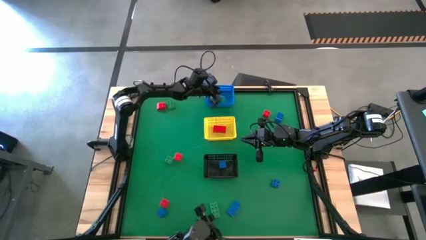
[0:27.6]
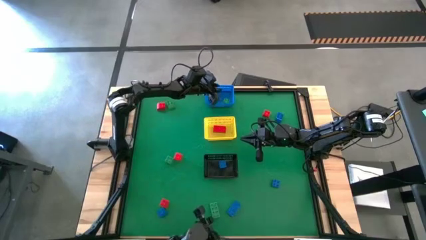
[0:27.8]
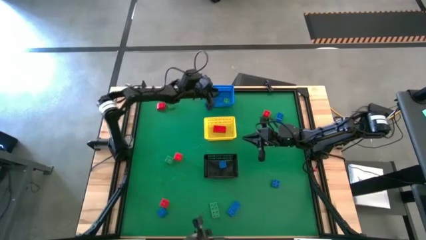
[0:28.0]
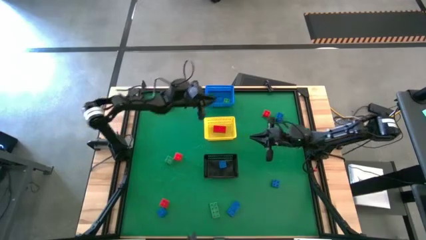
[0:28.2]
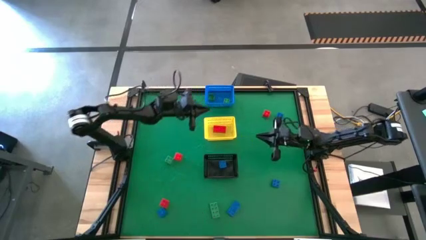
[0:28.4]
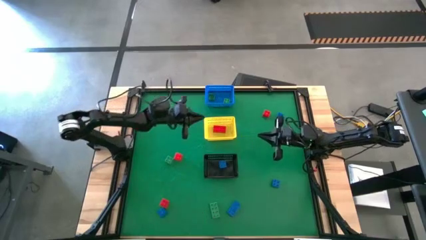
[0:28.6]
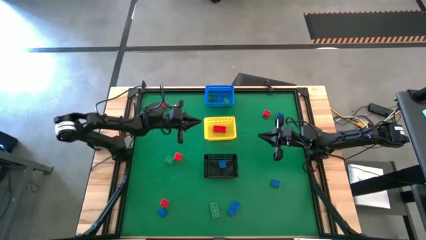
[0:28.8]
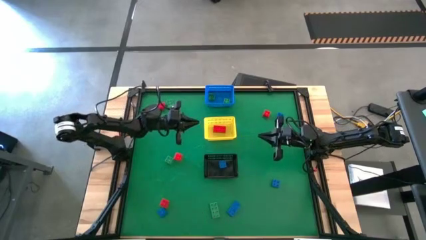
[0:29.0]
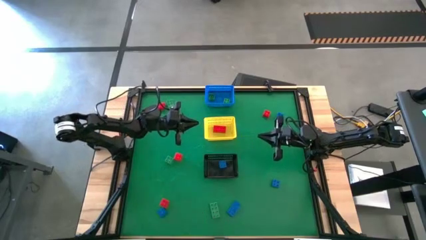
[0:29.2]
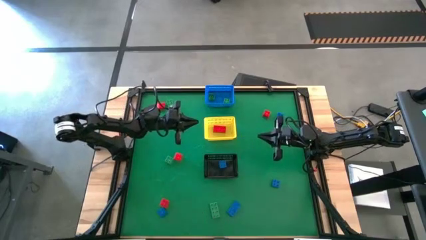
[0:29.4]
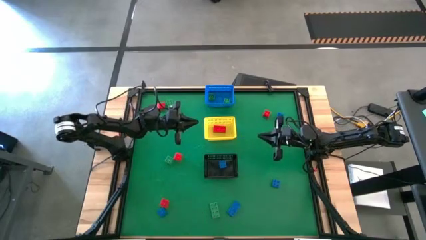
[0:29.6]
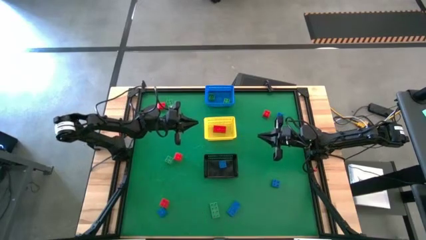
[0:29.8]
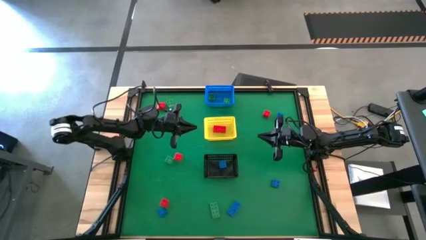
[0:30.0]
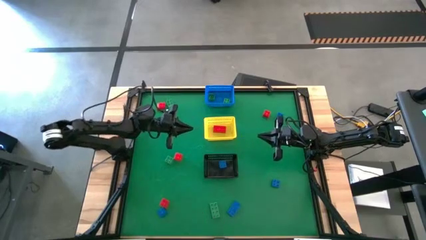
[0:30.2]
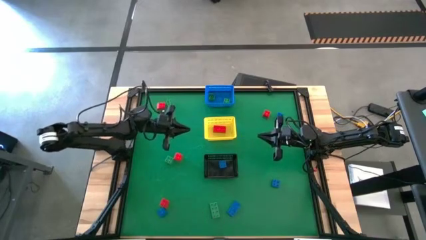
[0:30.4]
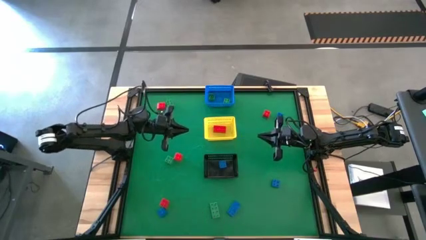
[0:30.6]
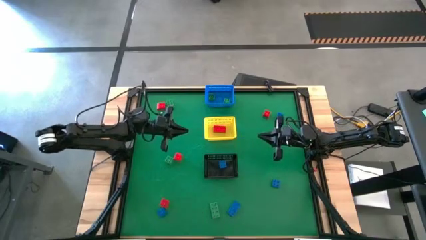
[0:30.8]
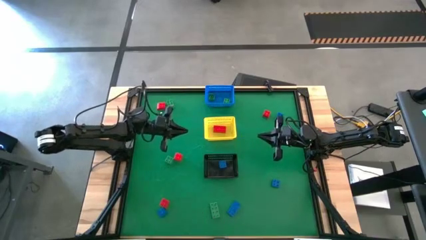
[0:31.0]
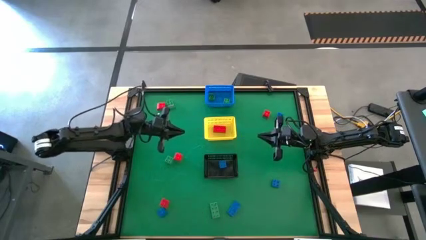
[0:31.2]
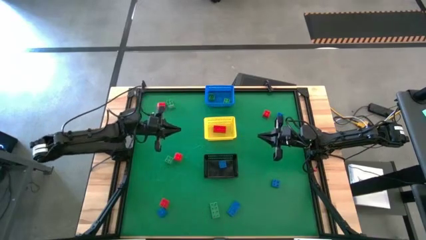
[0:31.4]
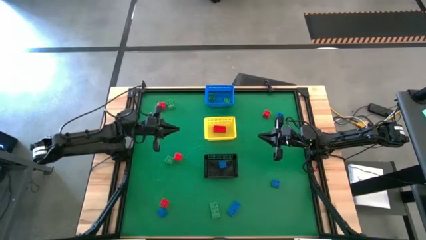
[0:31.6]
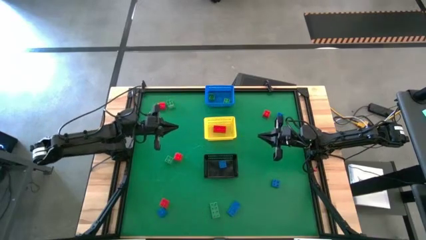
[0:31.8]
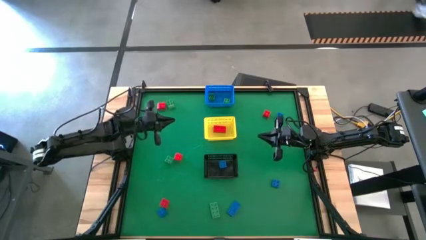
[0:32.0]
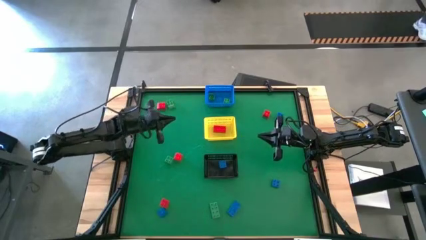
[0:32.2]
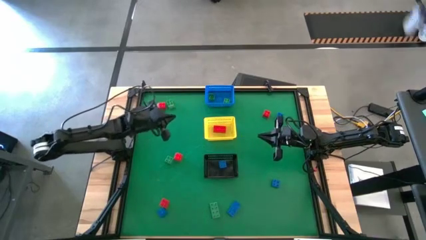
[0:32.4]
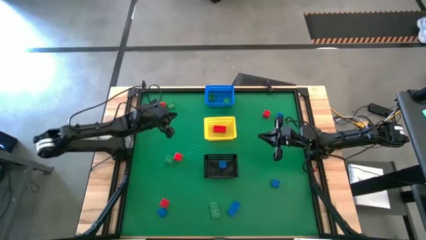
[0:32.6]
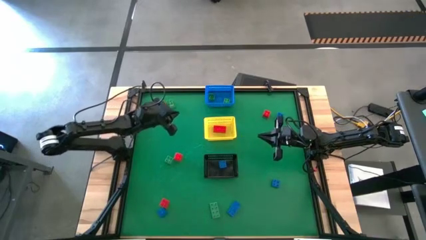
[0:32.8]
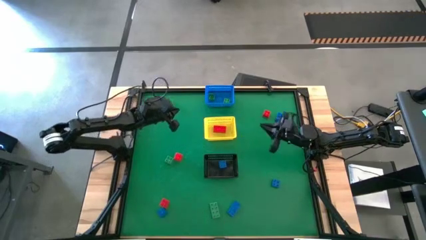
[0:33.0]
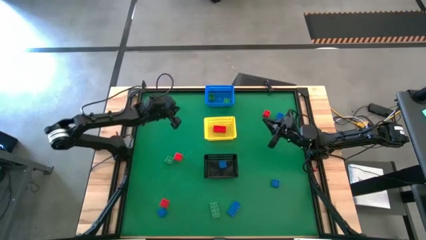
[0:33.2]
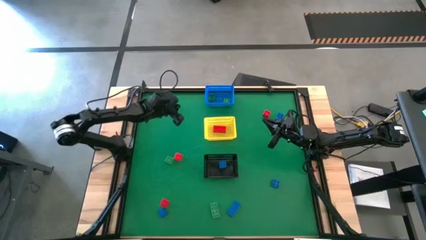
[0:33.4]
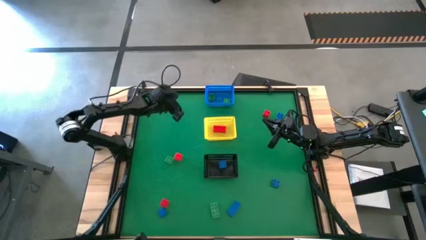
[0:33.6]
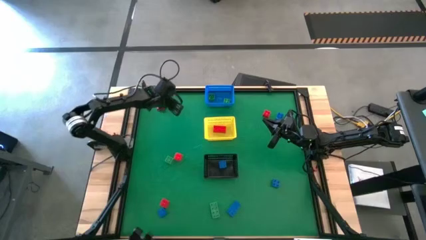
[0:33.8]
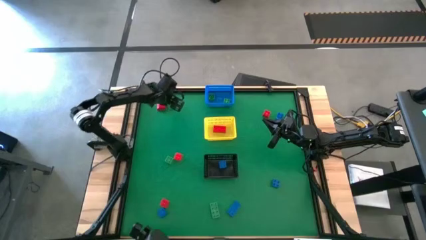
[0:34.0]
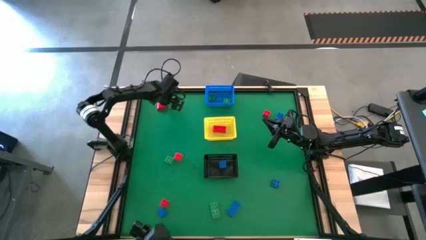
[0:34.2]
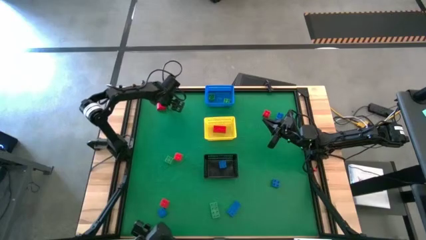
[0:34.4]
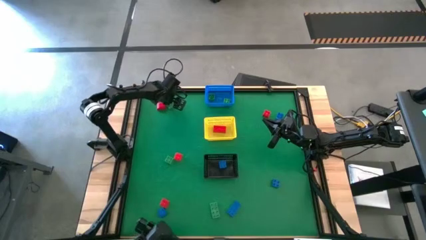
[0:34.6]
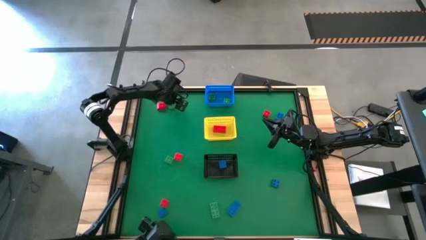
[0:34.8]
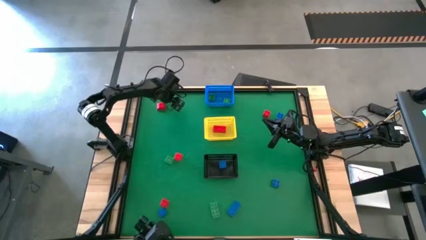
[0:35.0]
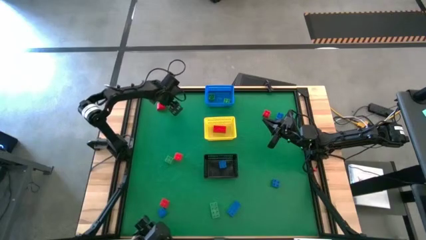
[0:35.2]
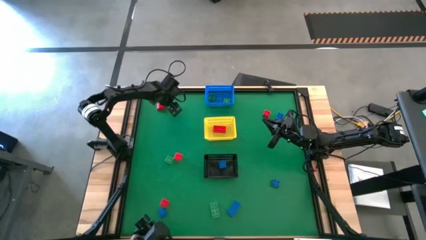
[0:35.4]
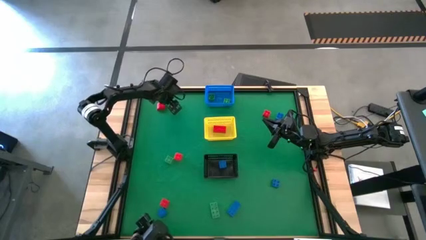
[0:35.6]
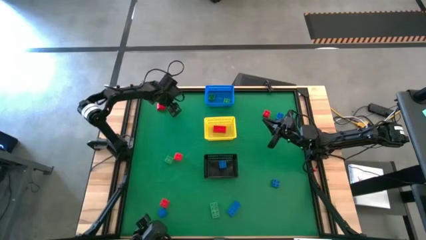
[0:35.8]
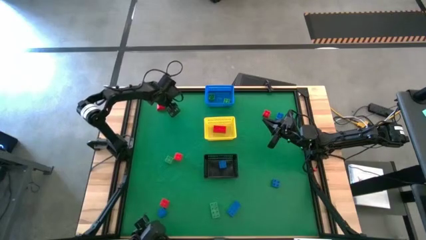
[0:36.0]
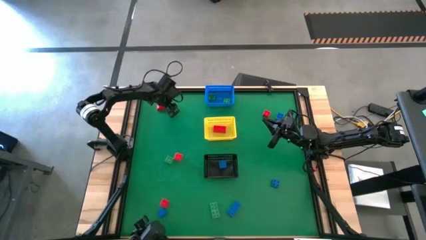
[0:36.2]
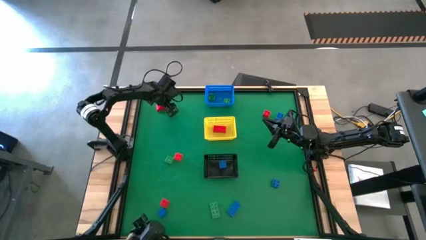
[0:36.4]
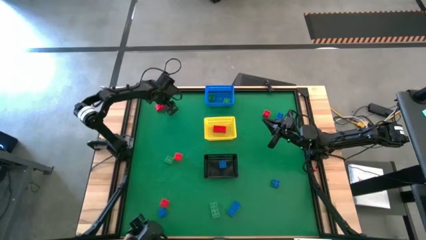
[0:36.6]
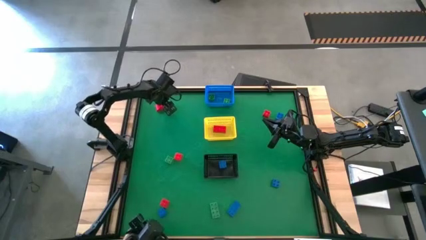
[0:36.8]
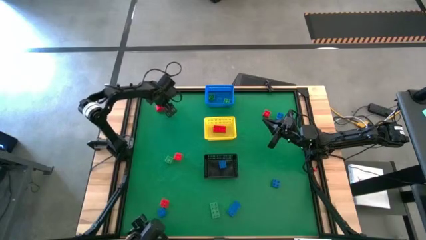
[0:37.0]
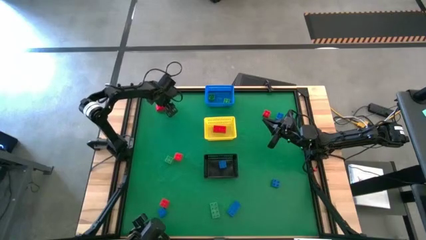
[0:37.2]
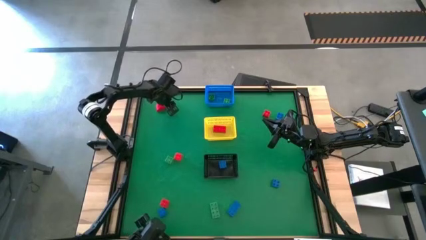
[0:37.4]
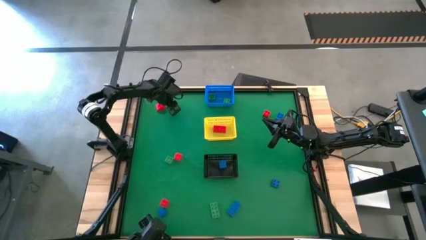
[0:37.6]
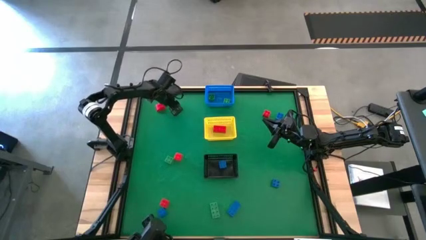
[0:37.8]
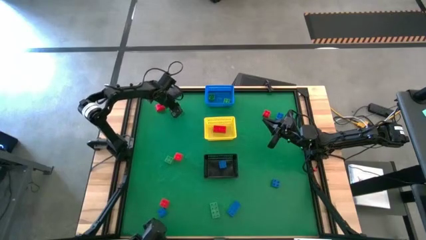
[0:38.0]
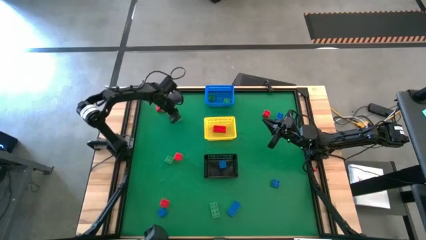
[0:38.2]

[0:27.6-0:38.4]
Task: Sort & place blocks by color
Put the green game piece into the blue bin

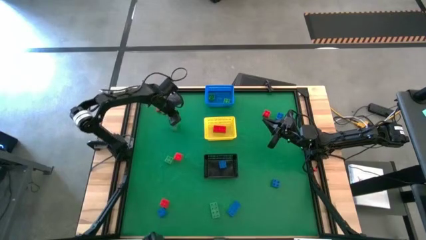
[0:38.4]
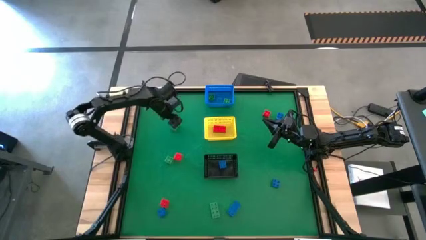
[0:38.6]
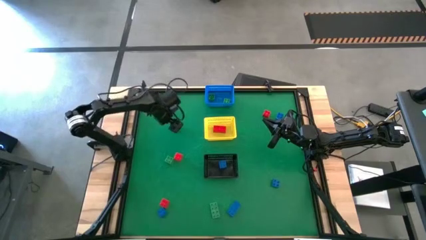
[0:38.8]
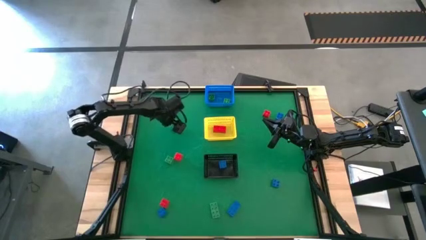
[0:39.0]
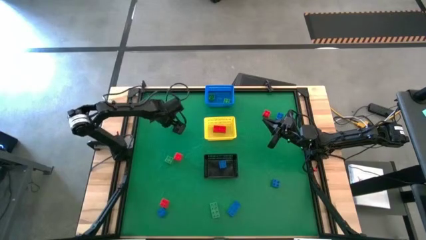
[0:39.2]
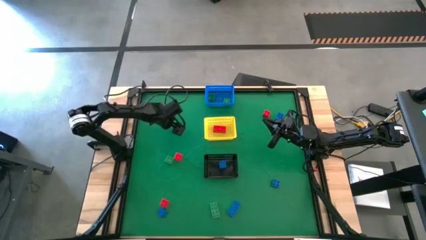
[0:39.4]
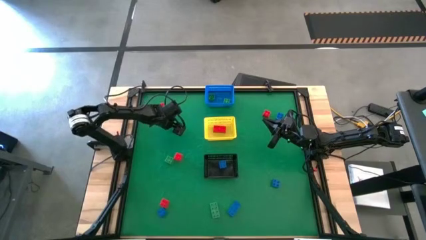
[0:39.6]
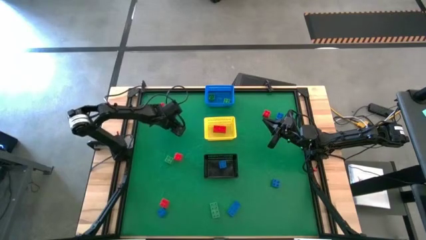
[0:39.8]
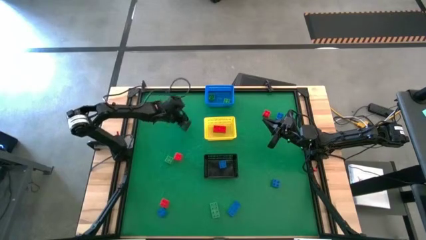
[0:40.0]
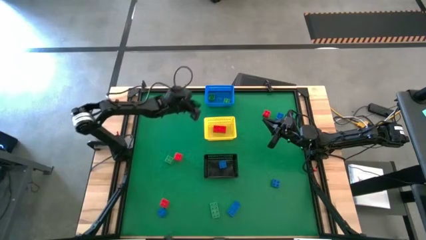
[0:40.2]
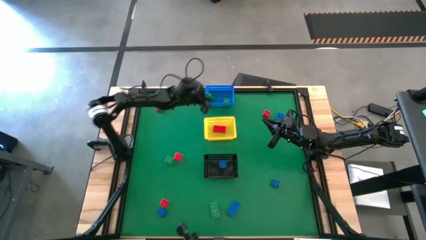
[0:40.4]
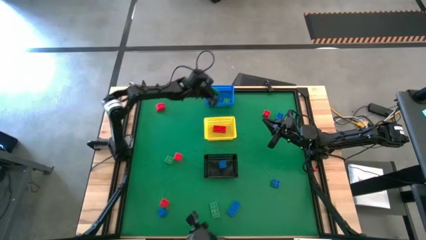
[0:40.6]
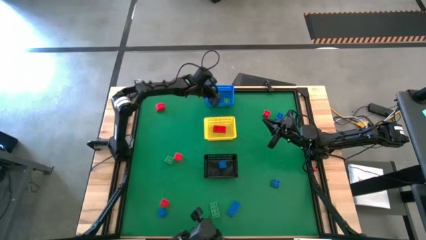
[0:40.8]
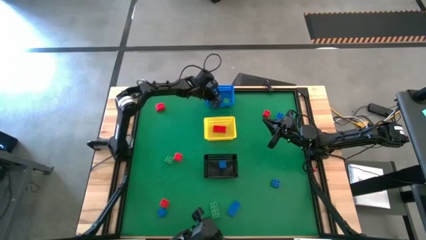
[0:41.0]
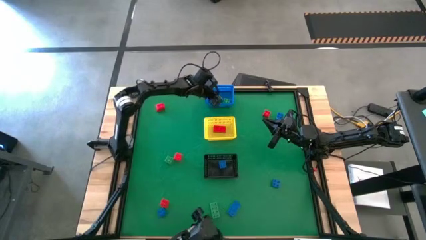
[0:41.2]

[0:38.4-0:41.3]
Put the green game piece into the blue bin

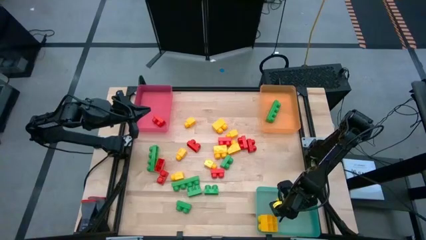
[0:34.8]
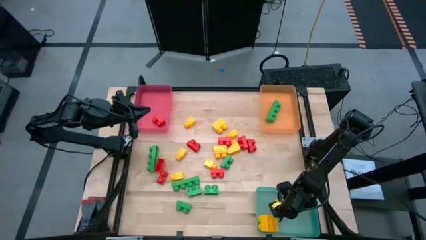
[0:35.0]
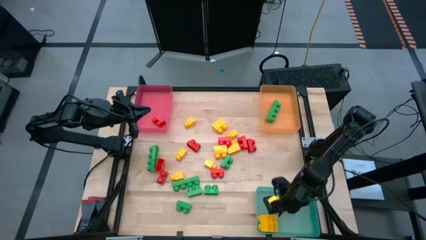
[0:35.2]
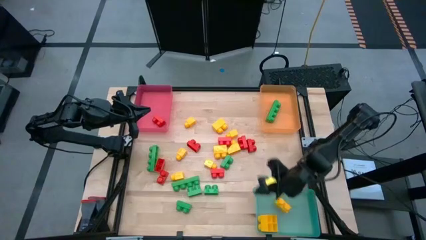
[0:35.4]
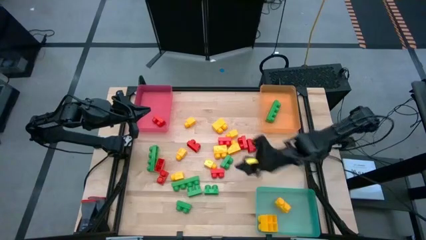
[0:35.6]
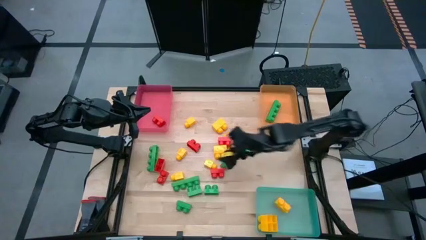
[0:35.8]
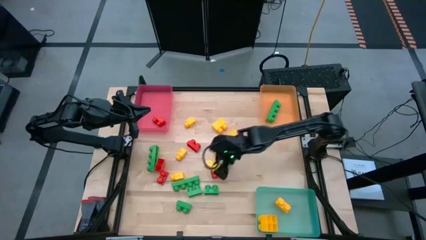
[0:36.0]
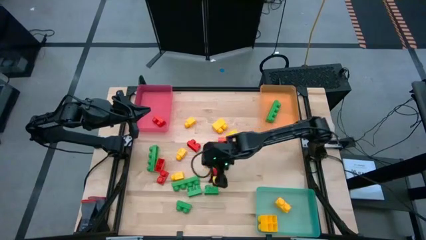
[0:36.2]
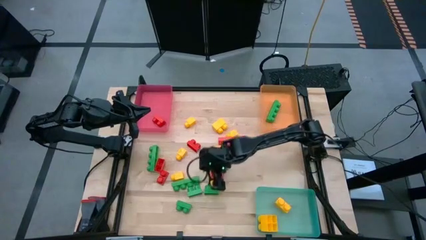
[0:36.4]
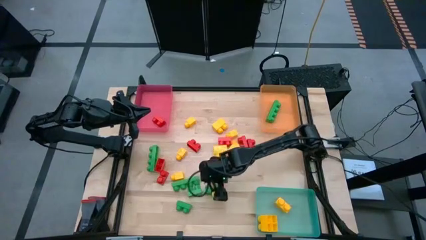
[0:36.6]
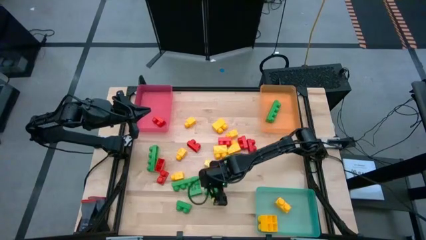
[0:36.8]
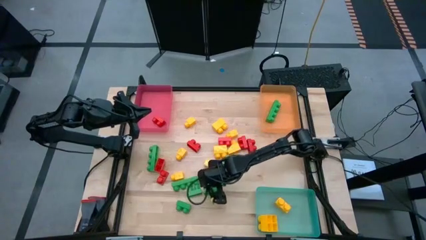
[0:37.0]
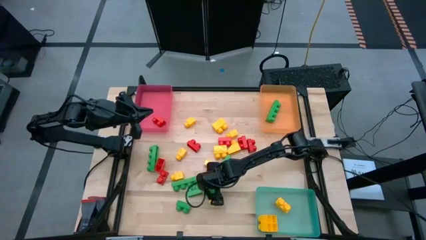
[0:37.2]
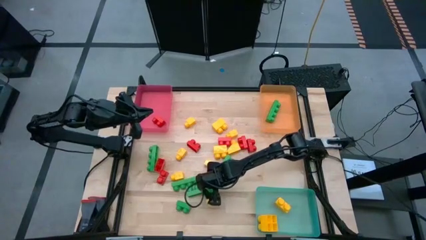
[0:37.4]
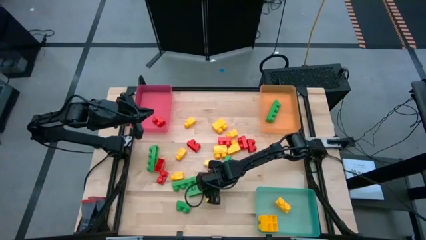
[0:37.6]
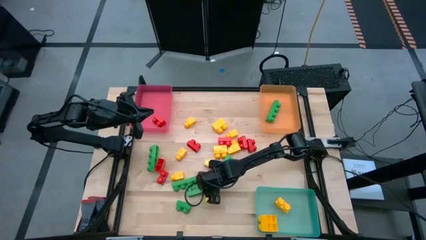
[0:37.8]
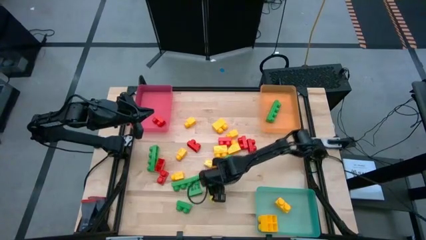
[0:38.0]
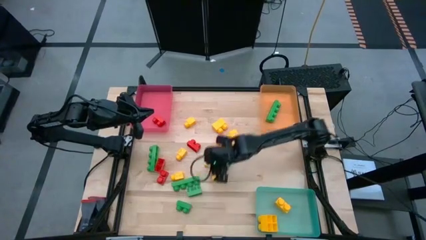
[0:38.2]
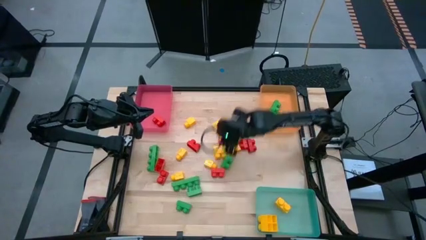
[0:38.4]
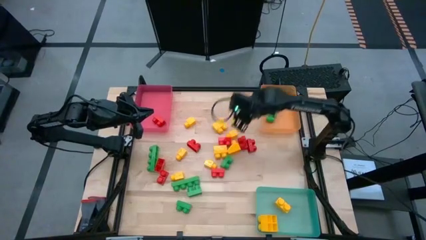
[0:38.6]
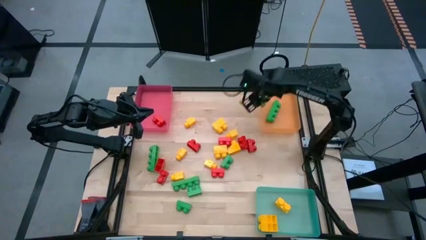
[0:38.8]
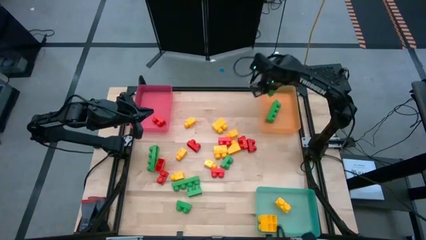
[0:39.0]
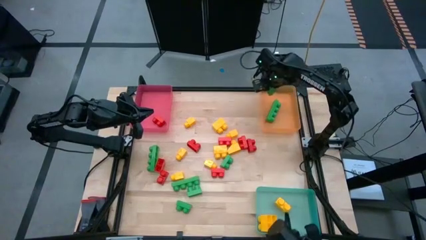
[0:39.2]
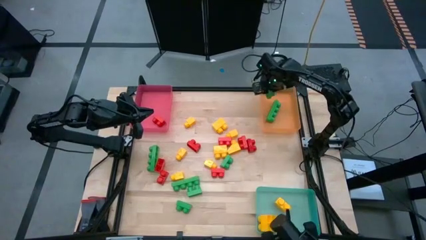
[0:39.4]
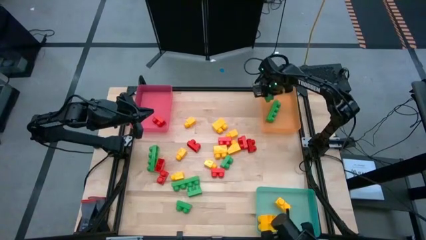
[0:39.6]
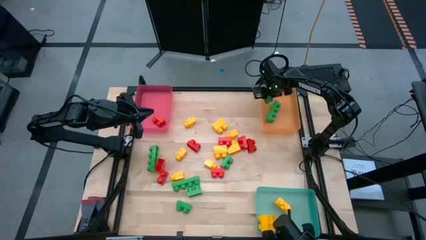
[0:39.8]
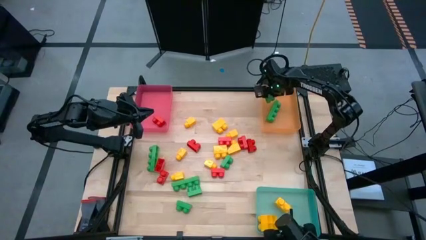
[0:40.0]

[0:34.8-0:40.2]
Task: Sort blocks
Put the green game piece into the orange bin
